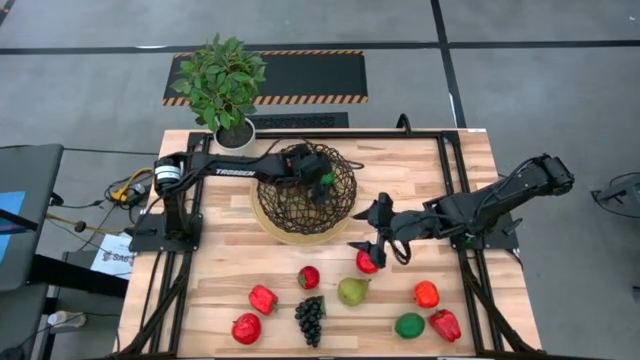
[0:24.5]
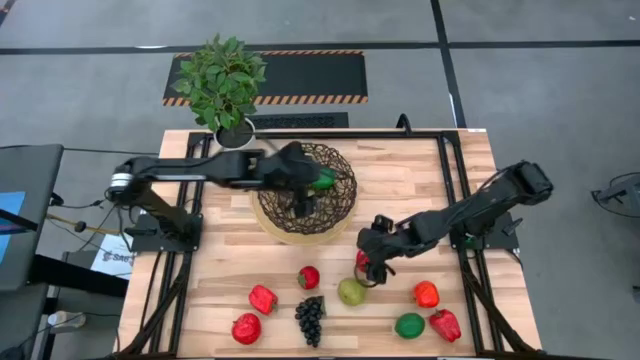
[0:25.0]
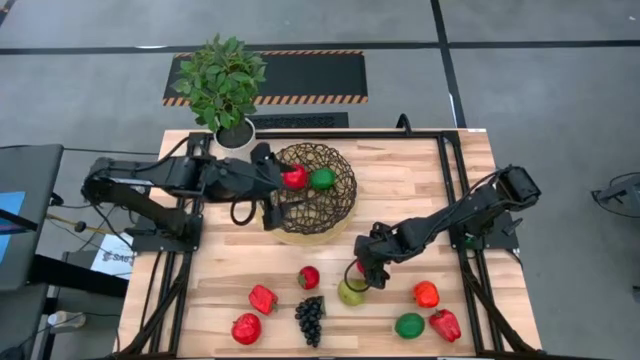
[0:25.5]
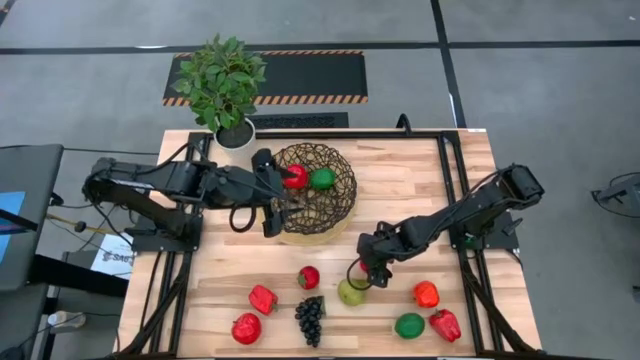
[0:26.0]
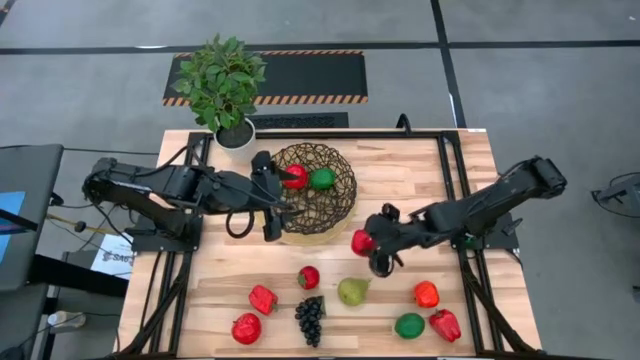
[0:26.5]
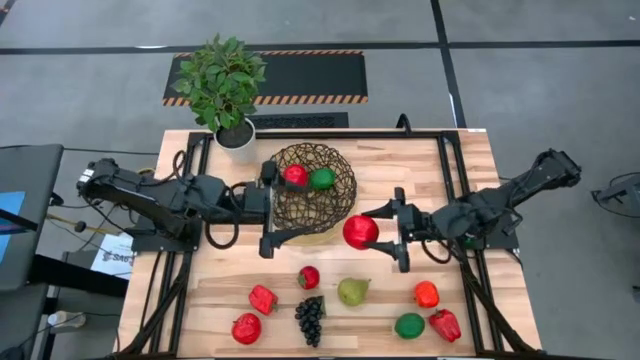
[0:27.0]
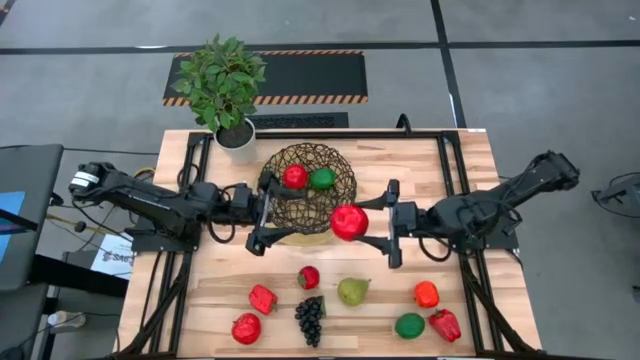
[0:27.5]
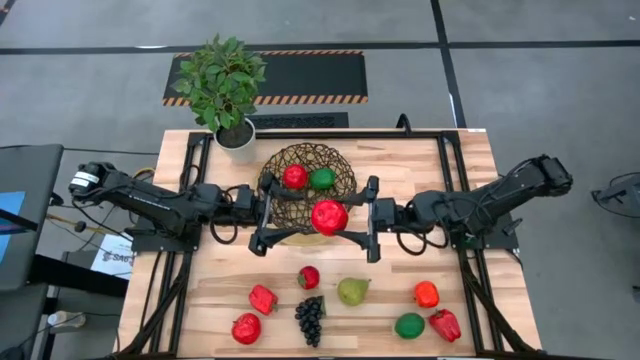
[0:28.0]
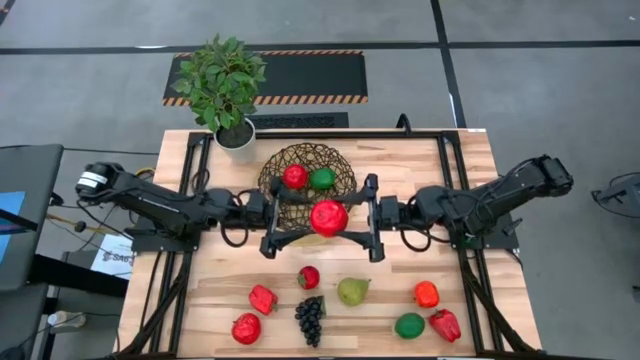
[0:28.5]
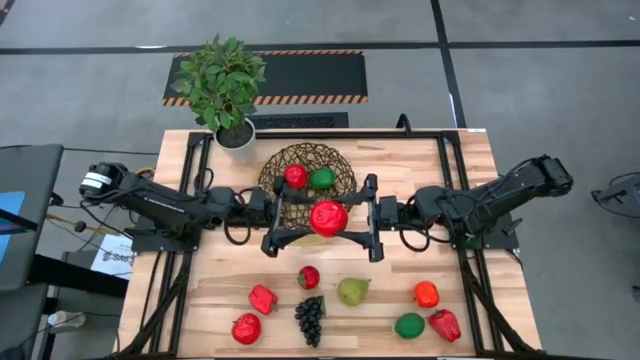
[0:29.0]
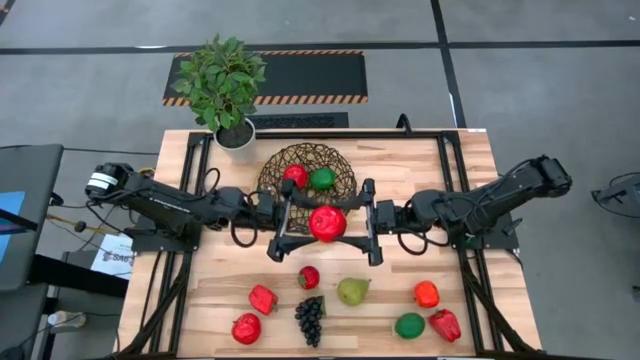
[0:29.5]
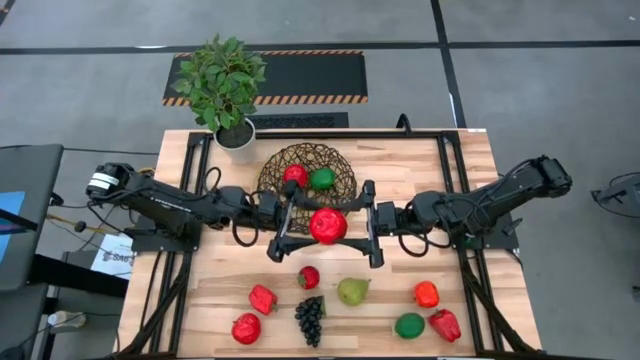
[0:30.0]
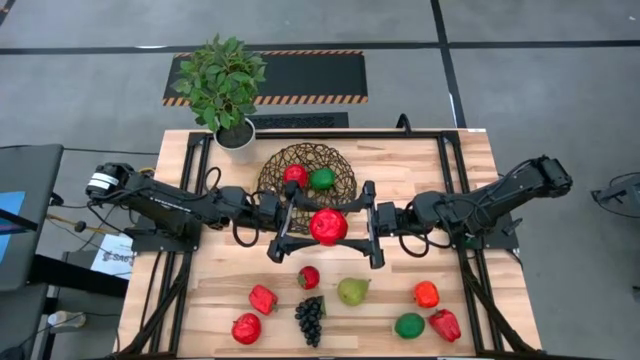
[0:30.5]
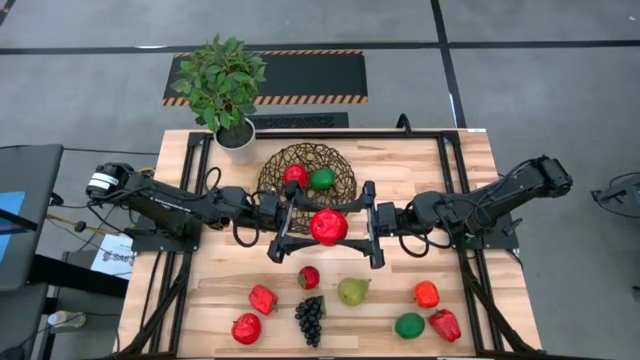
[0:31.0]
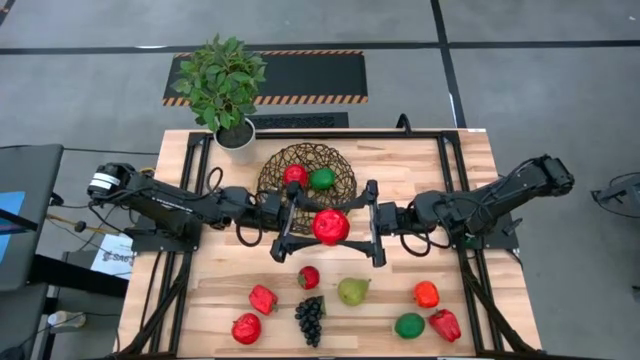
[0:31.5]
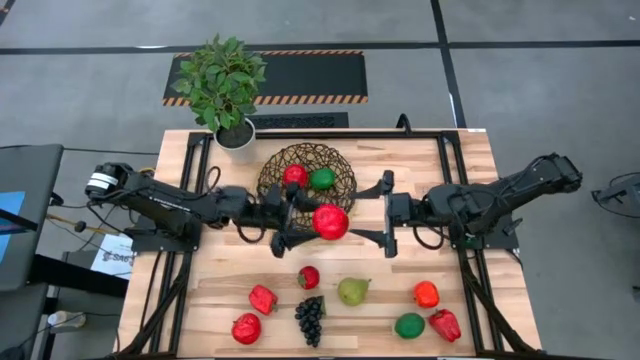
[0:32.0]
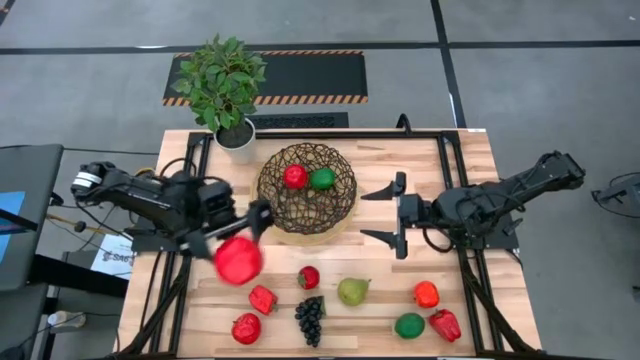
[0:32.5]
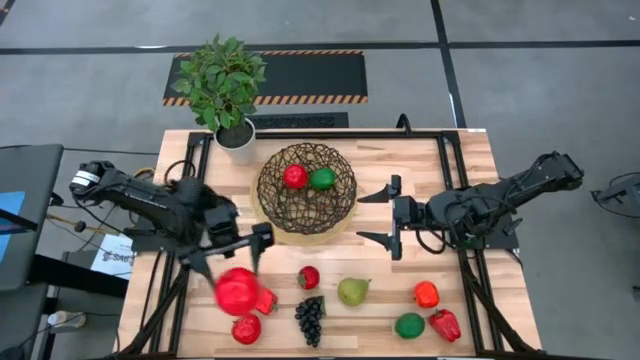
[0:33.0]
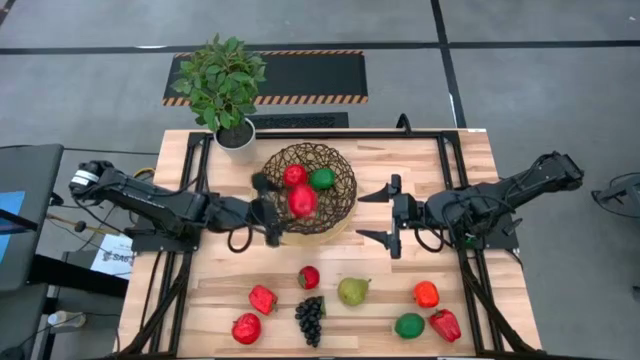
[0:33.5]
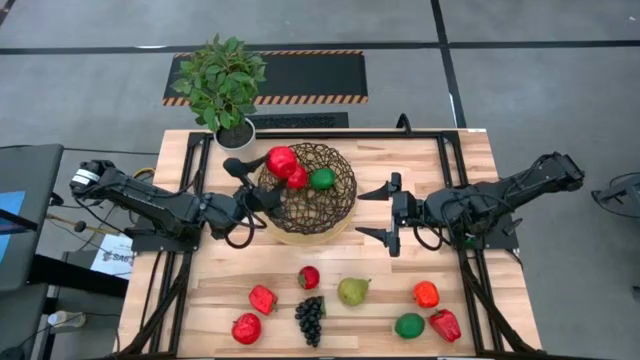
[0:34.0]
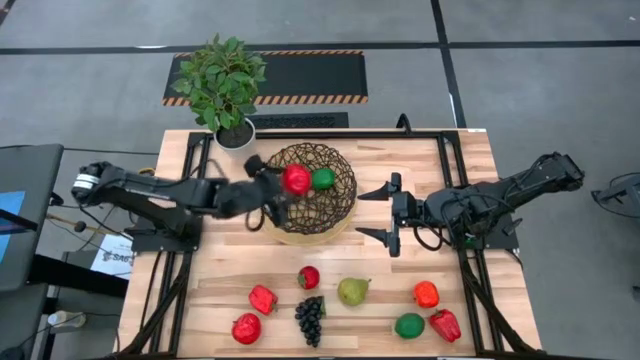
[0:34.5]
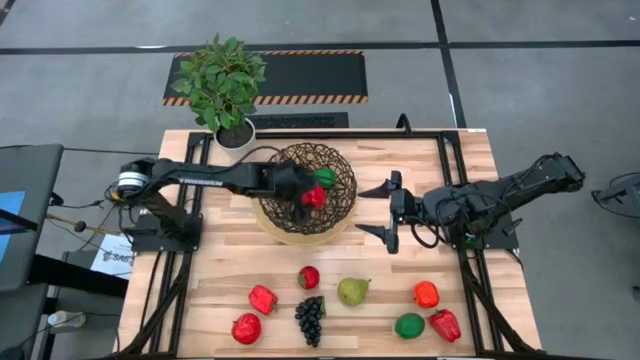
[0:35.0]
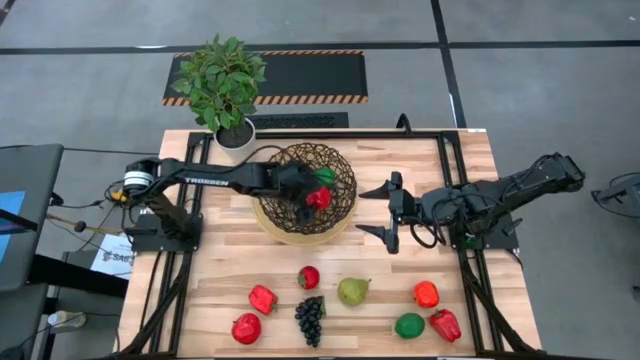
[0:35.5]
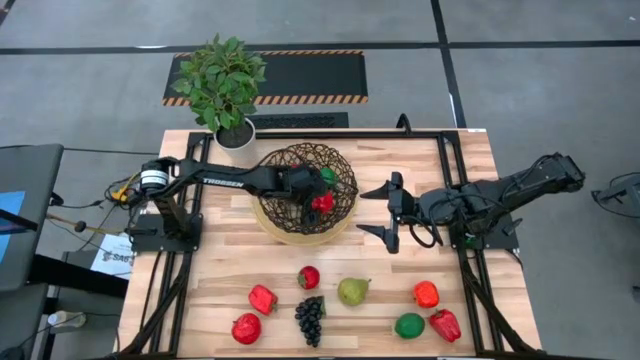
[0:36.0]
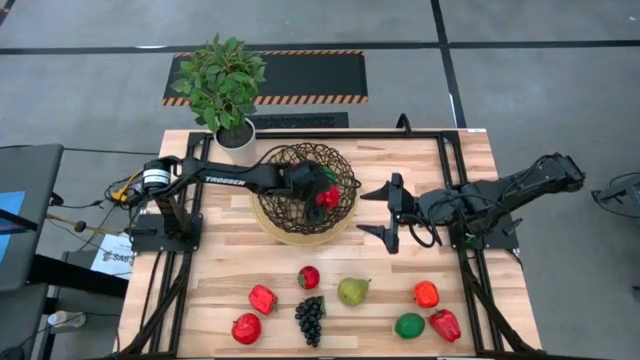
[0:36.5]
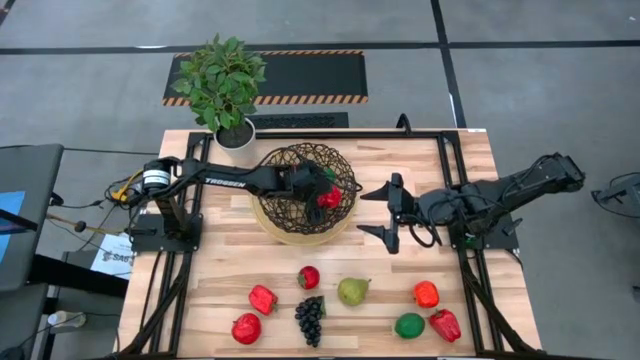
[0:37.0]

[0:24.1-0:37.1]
Task: Build produce basket
Put the top red apple into the basket

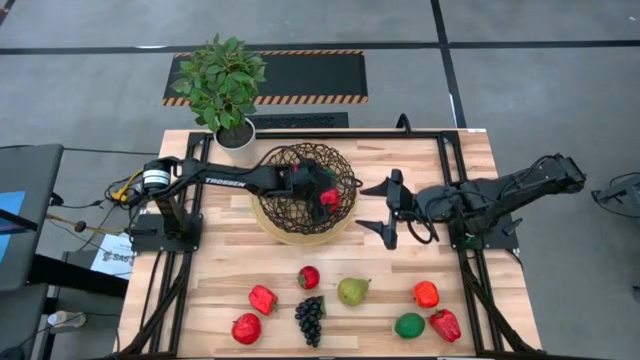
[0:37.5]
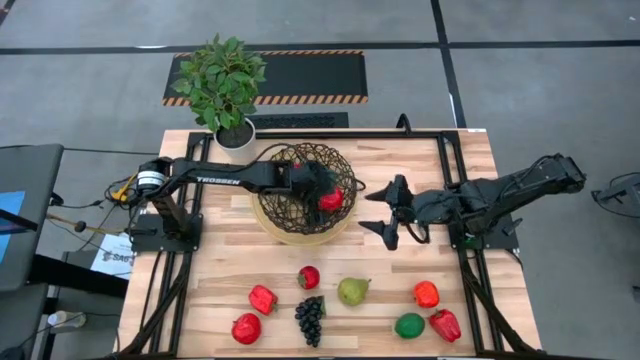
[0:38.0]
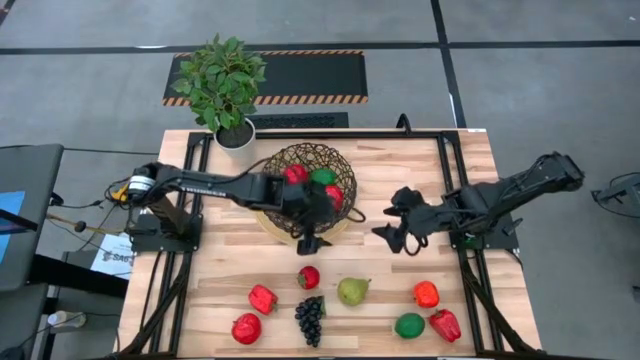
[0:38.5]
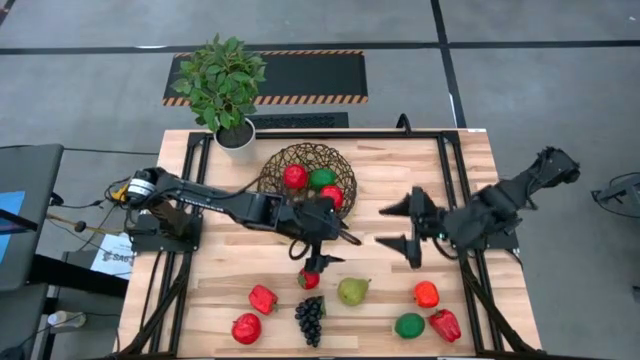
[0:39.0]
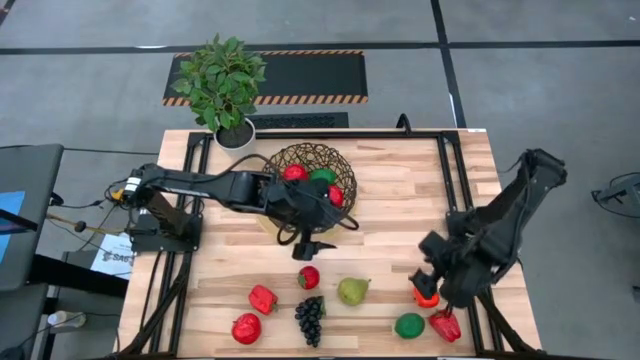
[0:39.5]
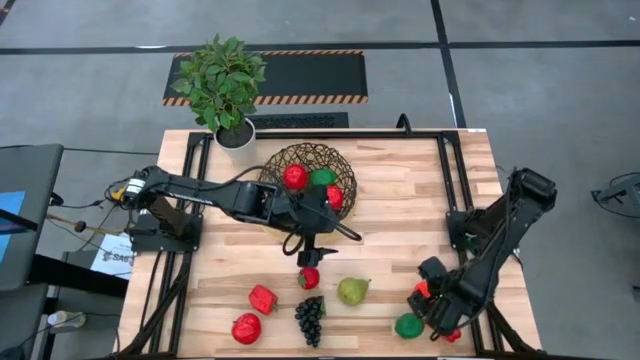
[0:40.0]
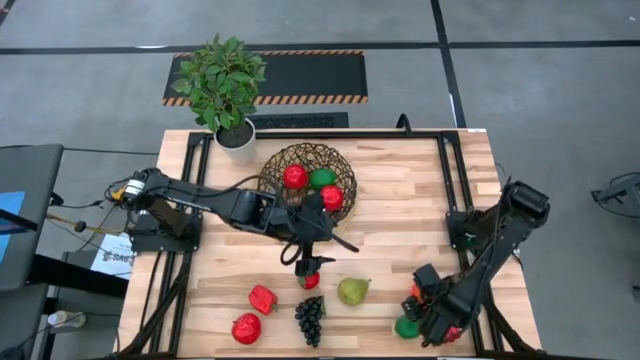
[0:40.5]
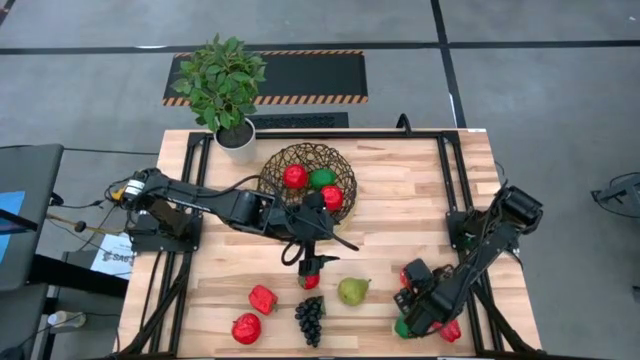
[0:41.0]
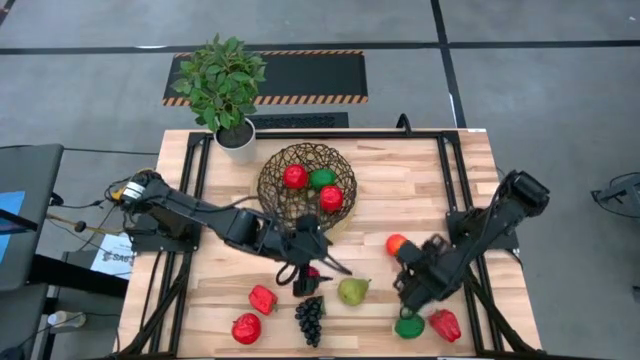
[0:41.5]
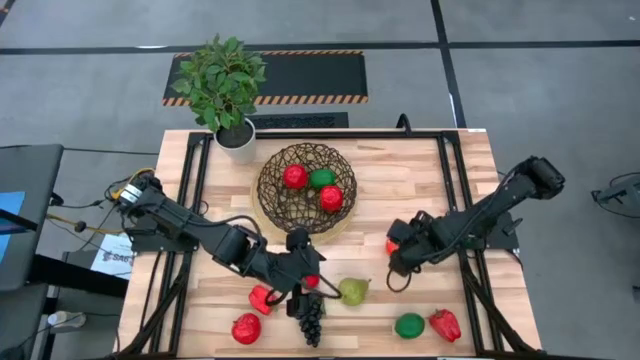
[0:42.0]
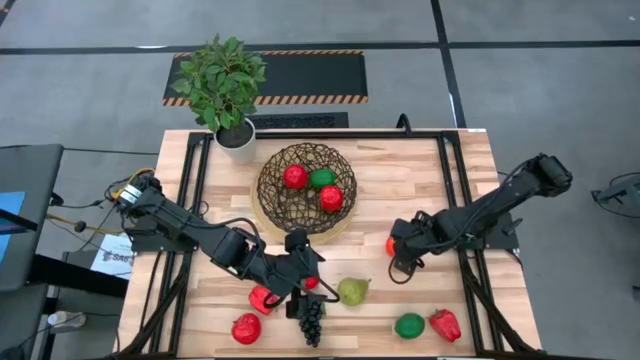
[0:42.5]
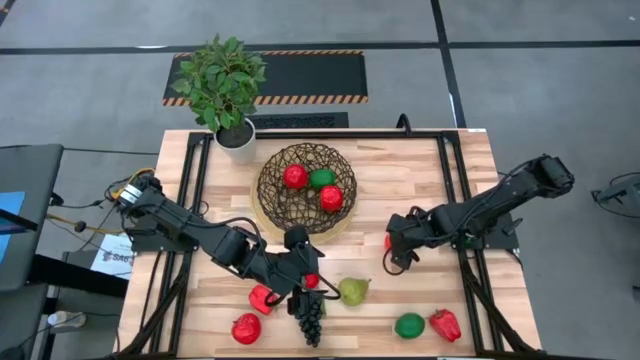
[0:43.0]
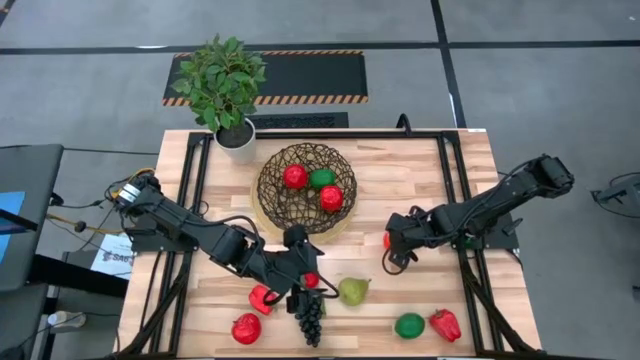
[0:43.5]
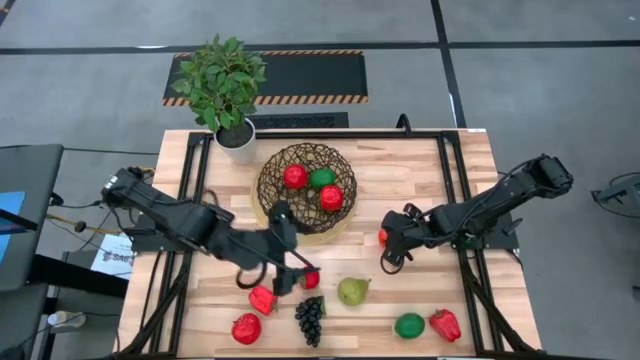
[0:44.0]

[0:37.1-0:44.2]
Put the orange apple into the basket

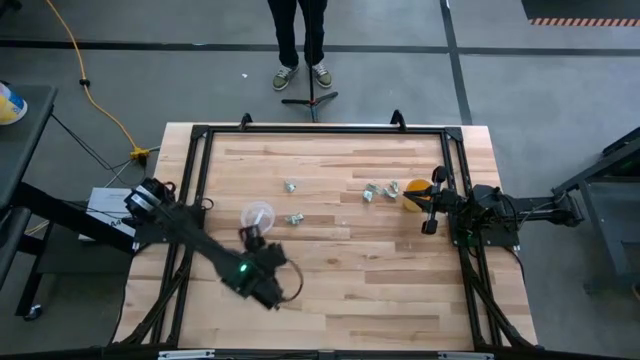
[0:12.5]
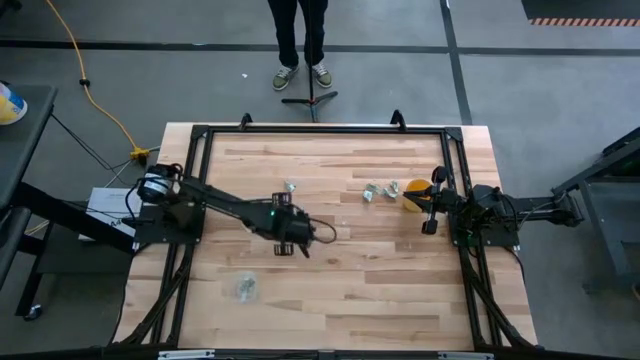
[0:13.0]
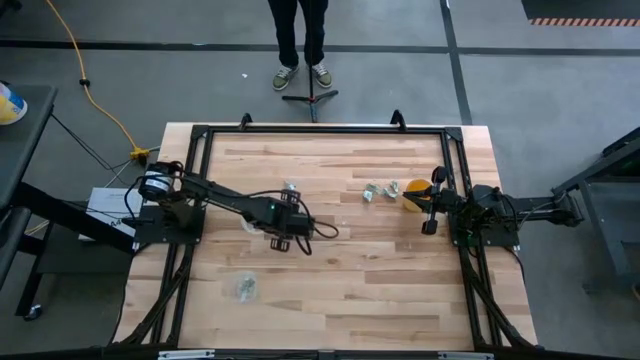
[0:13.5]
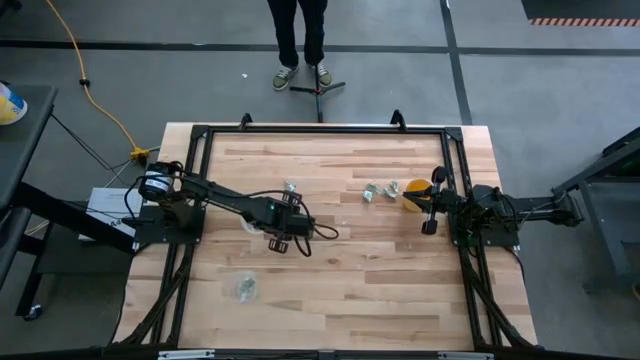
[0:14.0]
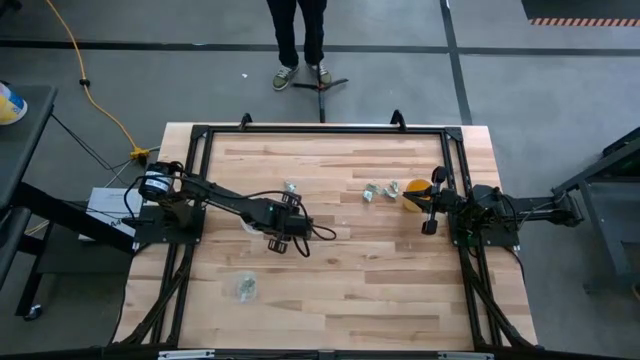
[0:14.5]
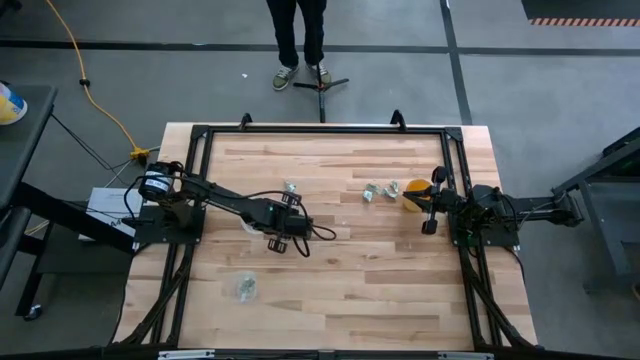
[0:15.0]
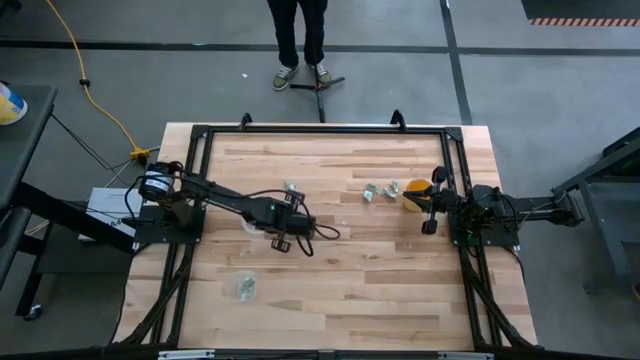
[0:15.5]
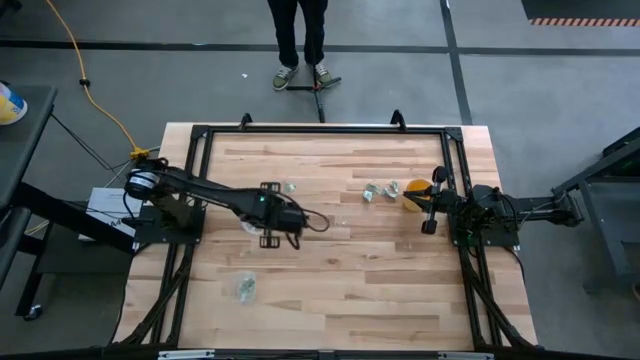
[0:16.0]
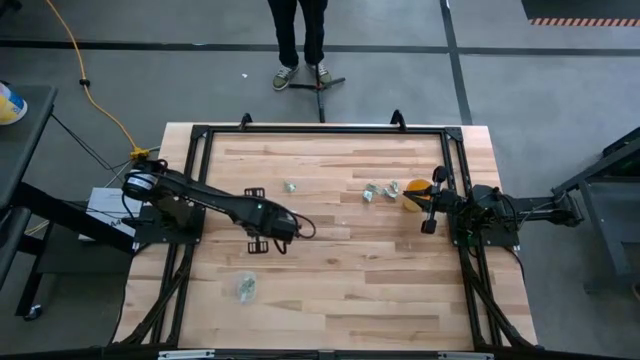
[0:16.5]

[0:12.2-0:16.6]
Task: Pick and place Stevia / Truvia into bins
Put the stevia packet in the top transparent container
